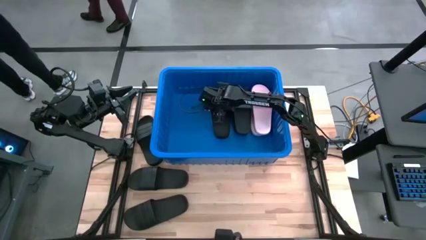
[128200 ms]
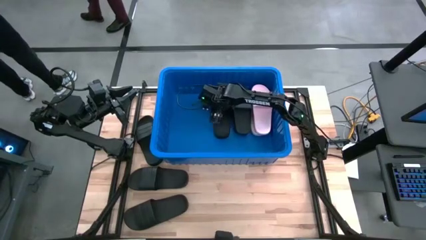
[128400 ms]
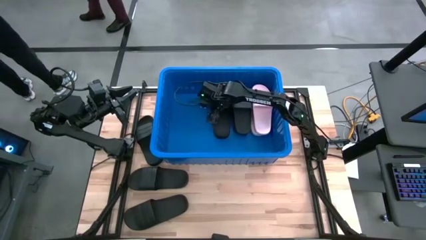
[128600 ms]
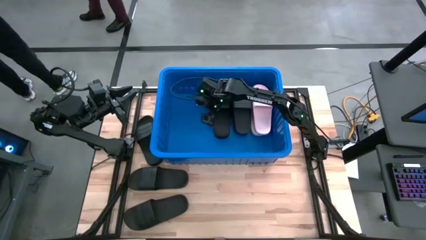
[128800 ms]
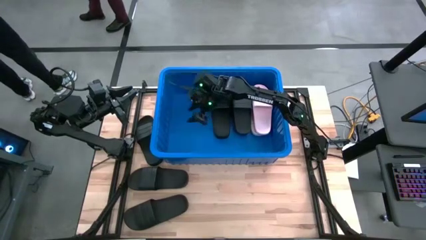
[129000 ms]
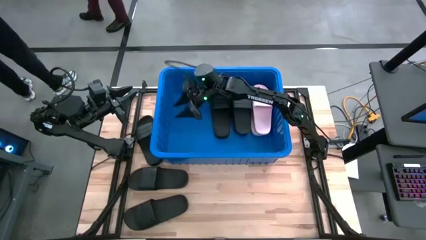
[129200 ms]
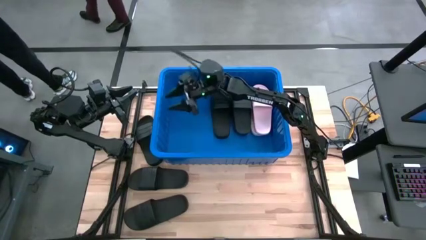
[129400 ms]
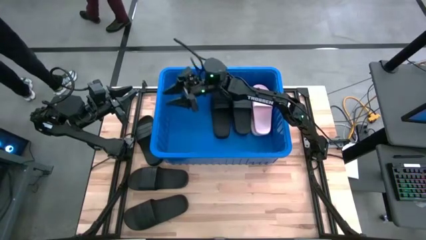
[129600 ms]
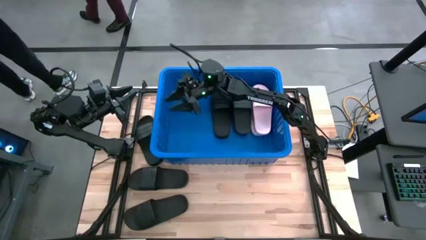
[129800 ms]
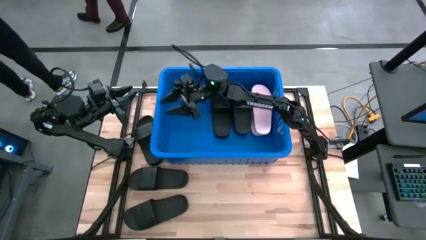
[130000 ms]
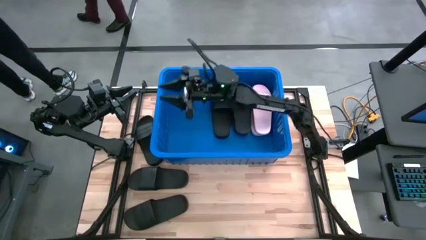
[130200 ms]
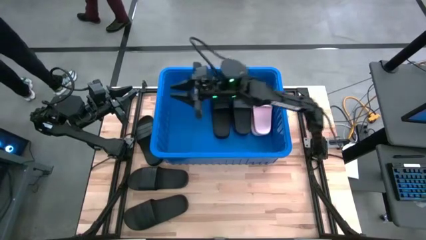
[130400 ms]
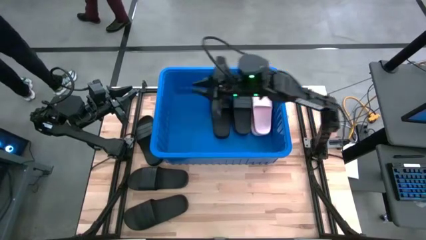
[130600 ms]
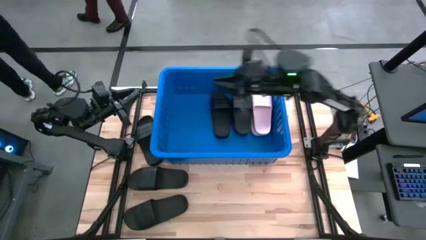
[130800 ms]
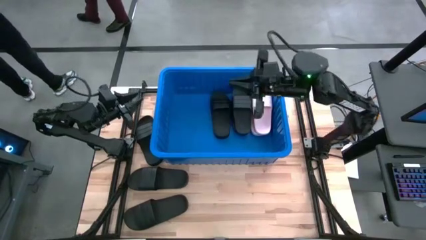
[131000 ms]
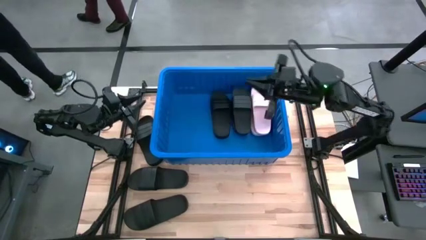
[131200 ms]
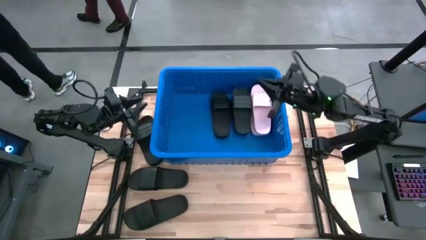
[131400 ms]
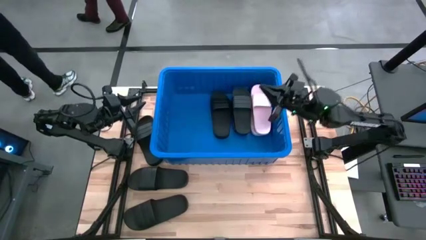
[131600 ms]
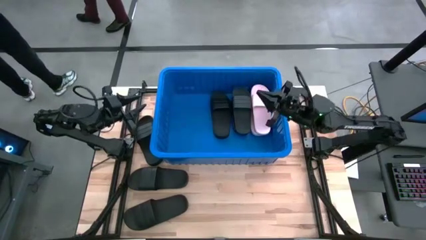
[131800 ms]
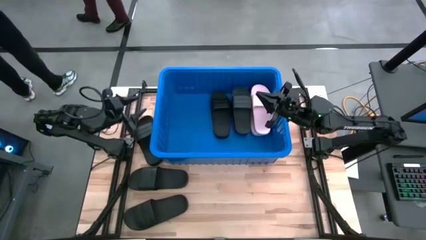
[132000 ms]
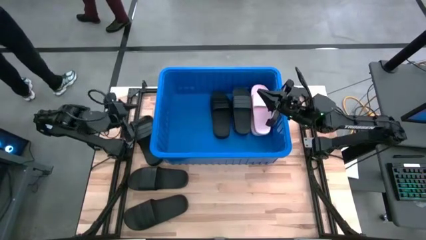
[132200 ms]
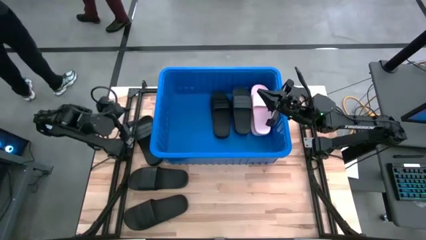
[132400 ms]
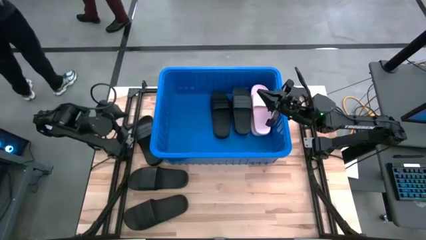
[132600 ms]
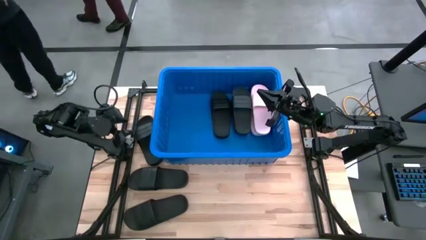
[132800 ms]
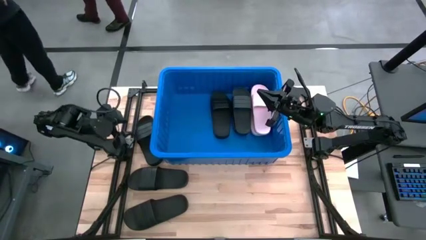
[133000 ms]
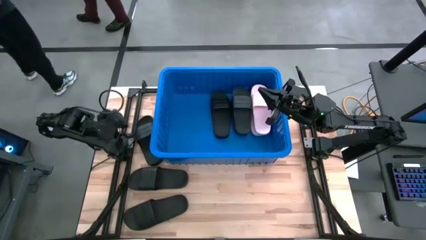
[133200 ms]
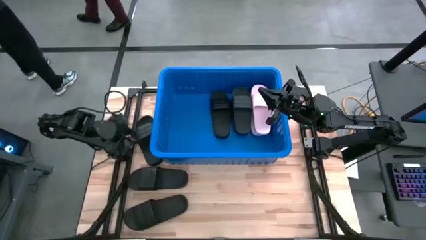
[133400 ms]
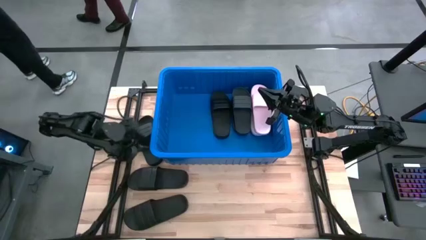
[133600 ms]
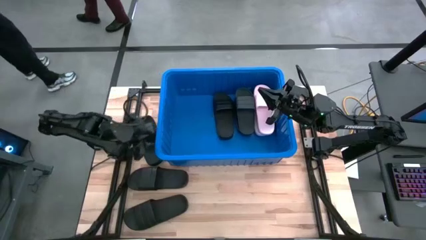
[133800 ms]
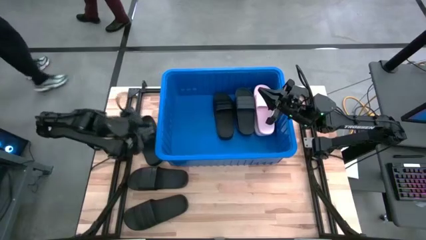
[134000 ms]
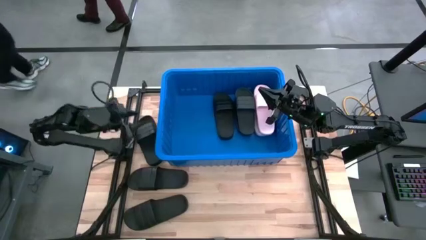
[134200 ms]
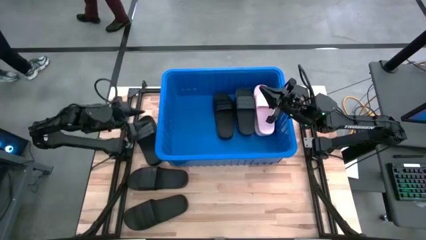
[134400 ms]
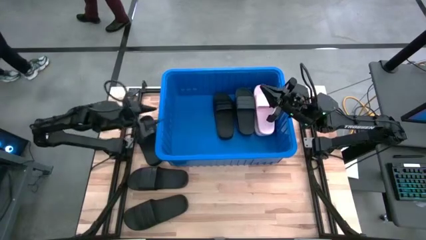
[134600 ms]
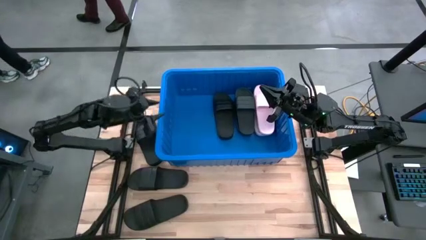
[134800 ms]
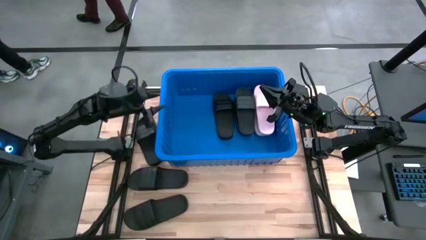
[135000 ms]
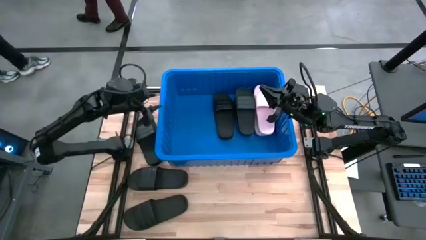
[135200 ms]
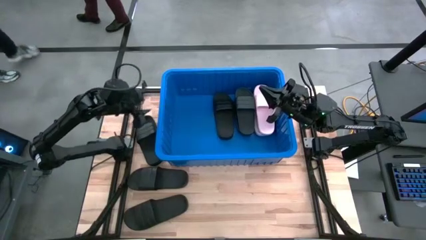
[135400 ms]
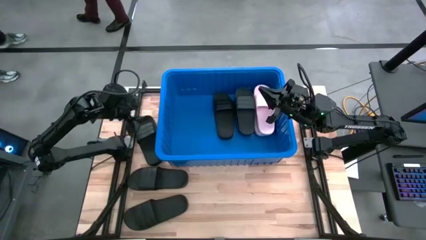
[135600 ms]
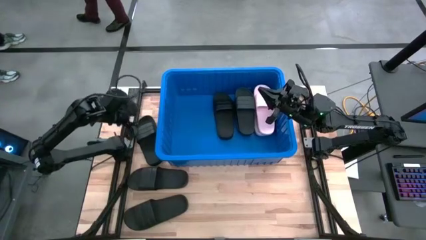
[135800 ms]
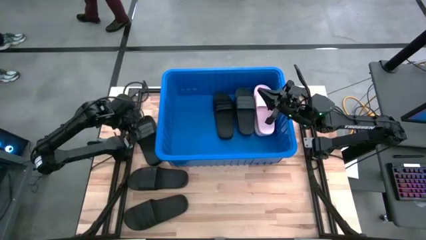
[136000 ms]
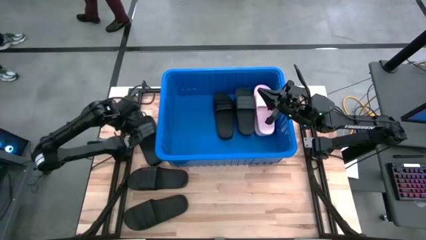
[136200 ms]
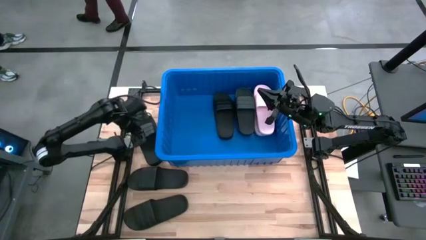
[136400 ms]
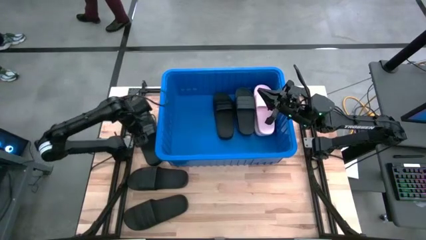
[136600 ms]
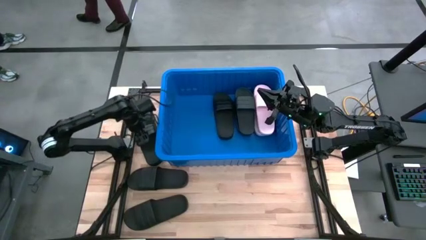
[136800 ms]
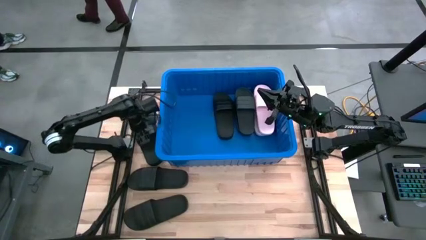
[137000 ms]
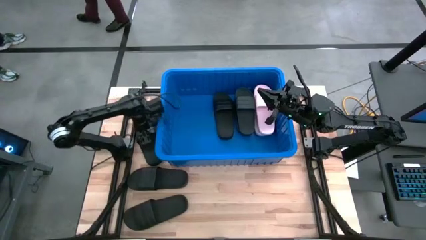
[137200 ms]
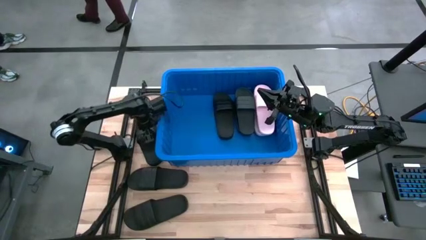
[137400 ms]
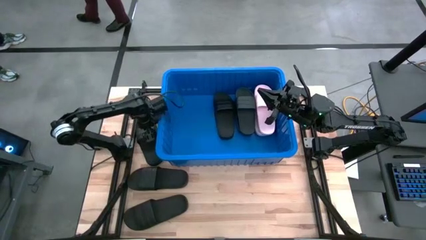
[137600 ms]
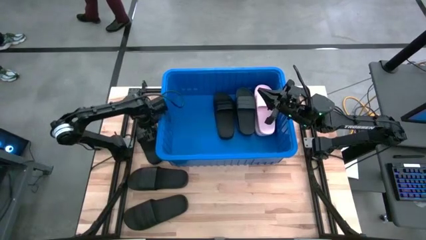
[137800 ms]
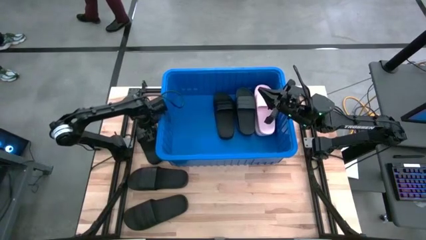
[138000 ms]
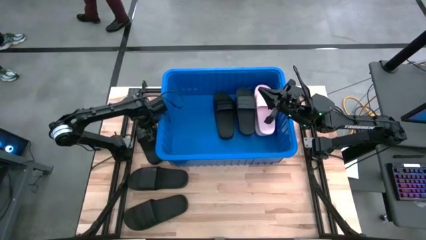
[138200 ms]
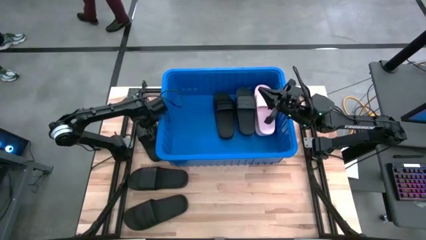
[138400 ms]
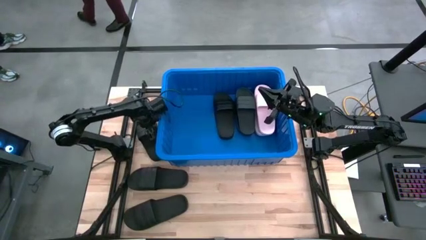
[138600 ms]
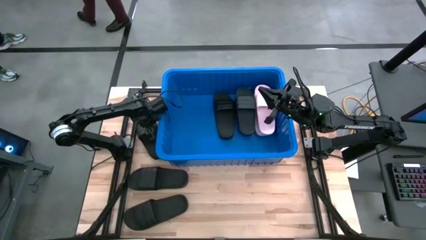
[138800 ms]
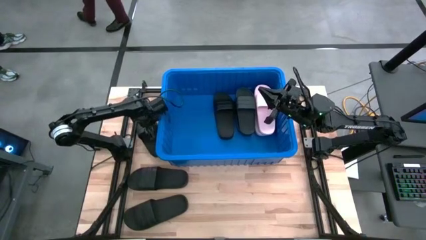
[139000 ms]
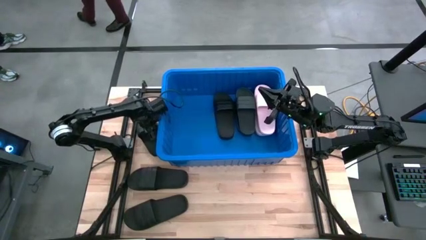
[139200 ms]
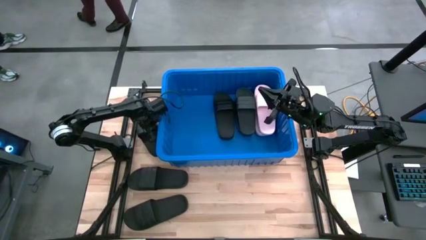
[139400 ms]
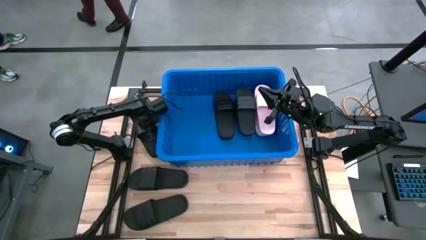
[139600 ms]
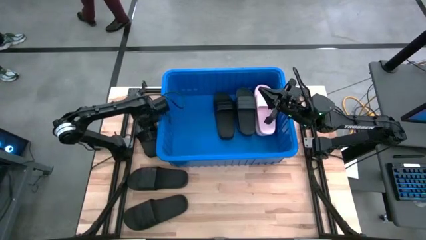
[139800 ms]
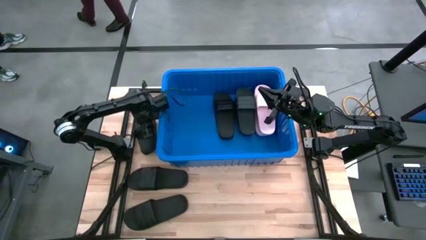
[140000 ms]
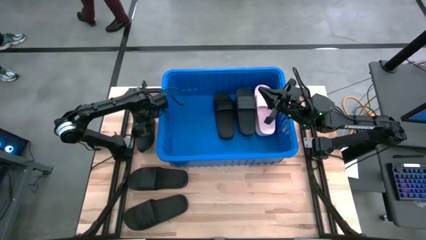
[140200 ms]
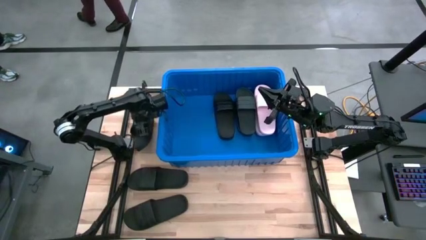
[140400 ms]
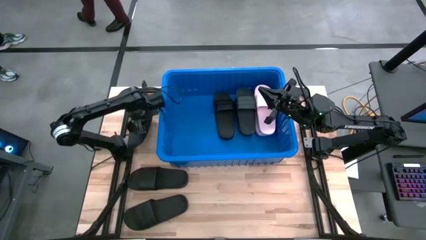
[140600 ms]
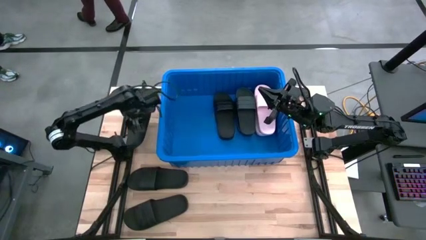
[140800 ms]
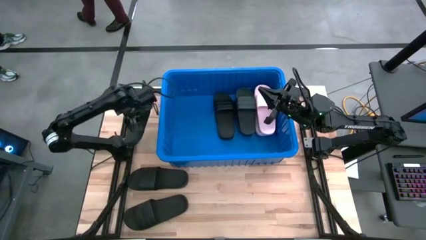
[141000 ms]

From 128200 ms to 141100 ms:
Task: Pick and place slides into bin
Stack the black slide on top of the black slide on the blue bin
